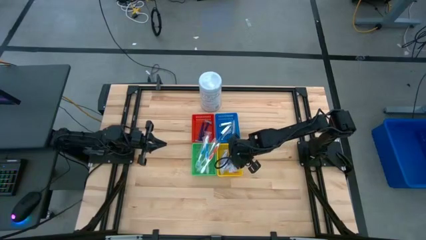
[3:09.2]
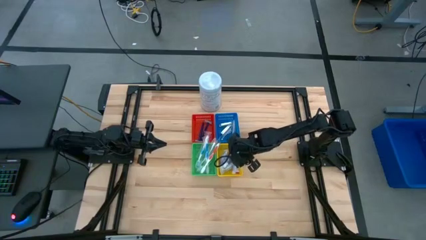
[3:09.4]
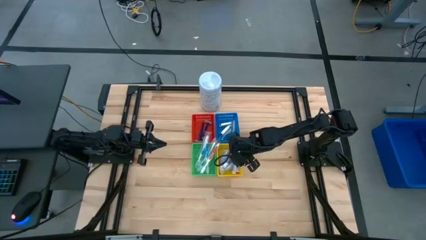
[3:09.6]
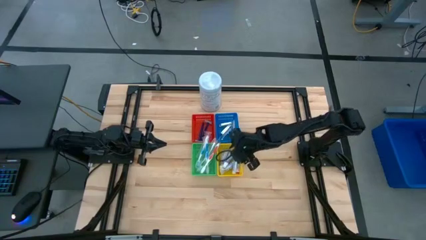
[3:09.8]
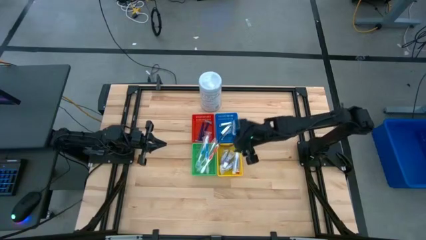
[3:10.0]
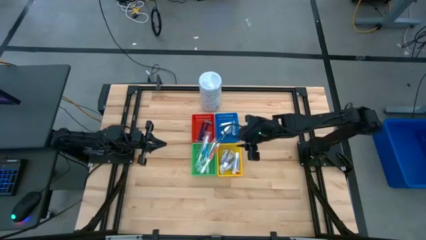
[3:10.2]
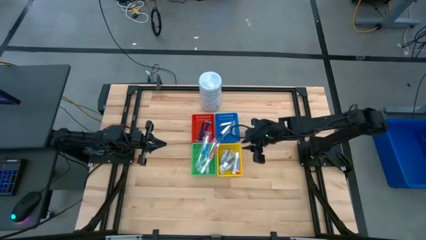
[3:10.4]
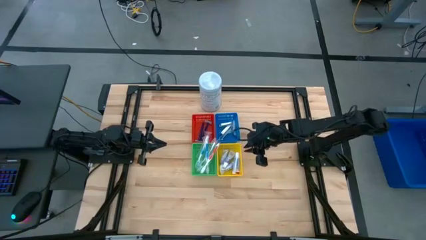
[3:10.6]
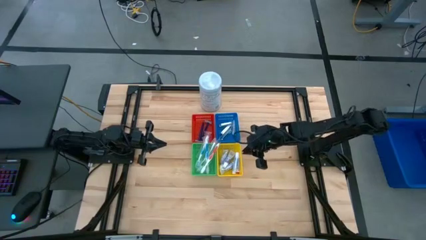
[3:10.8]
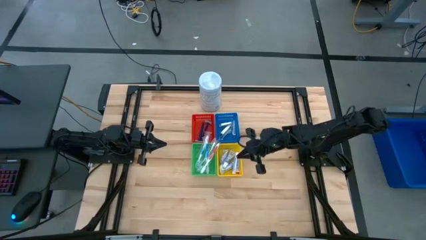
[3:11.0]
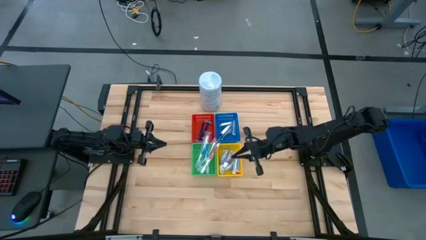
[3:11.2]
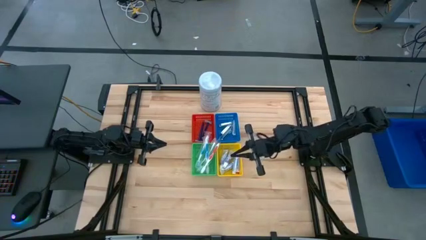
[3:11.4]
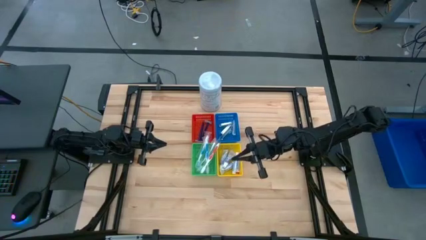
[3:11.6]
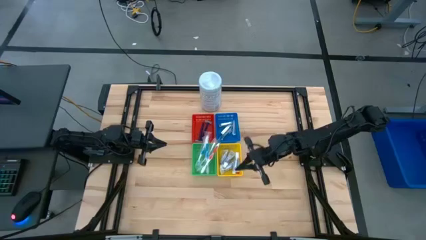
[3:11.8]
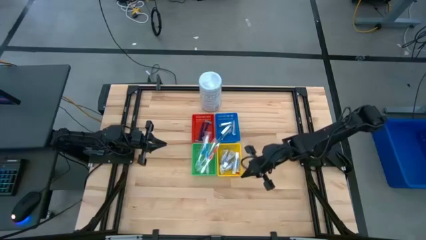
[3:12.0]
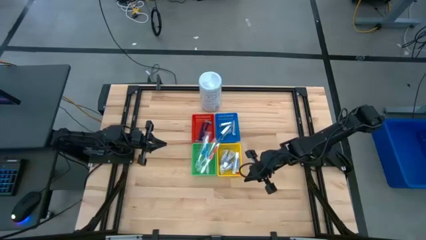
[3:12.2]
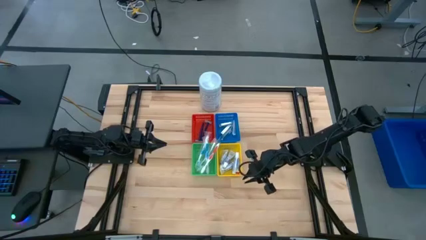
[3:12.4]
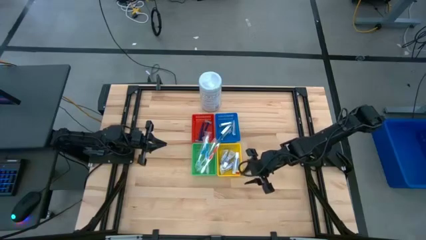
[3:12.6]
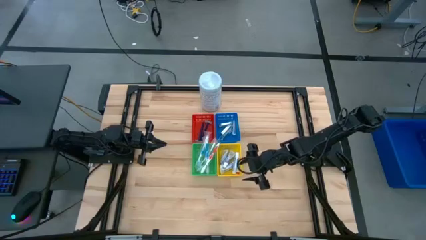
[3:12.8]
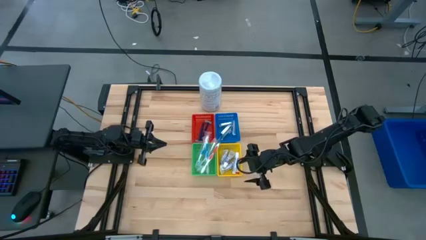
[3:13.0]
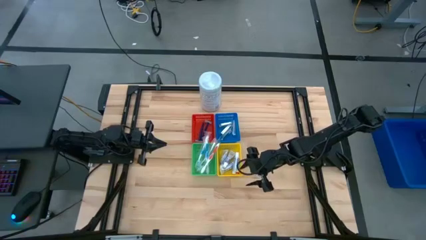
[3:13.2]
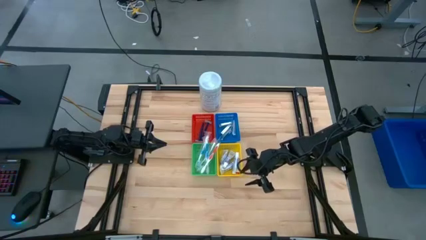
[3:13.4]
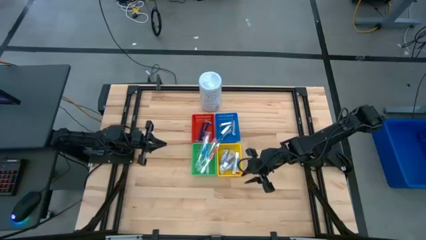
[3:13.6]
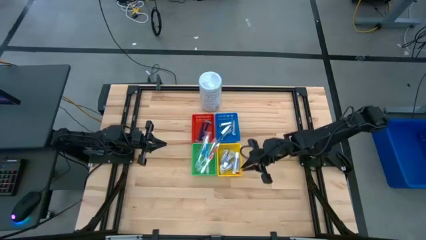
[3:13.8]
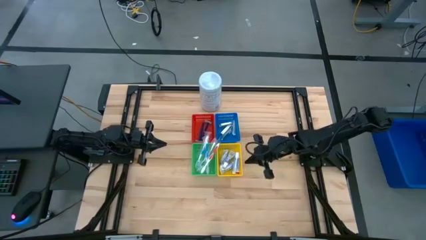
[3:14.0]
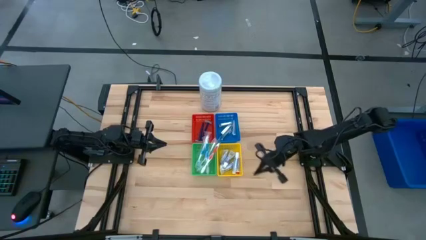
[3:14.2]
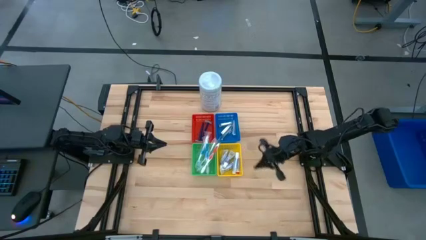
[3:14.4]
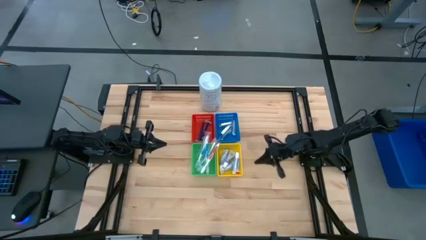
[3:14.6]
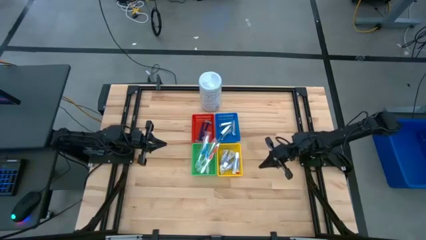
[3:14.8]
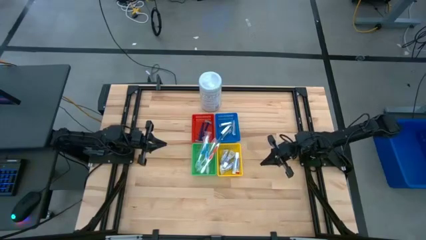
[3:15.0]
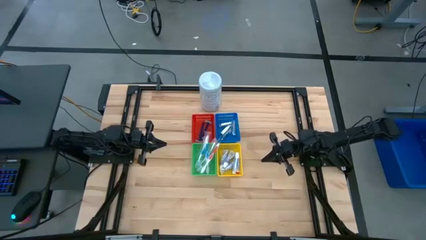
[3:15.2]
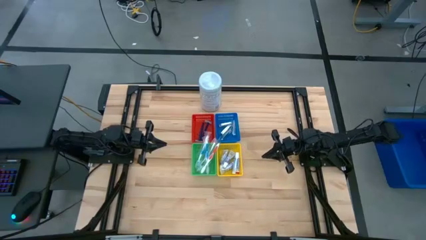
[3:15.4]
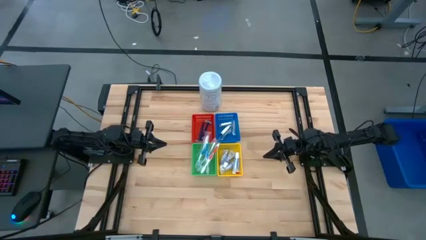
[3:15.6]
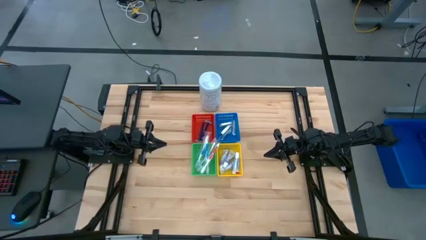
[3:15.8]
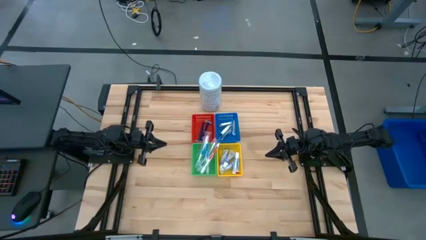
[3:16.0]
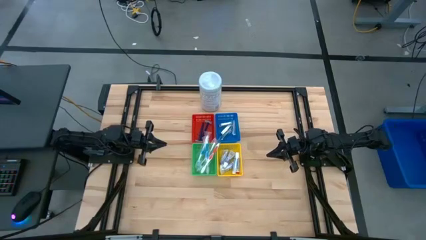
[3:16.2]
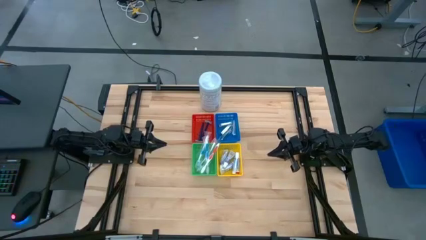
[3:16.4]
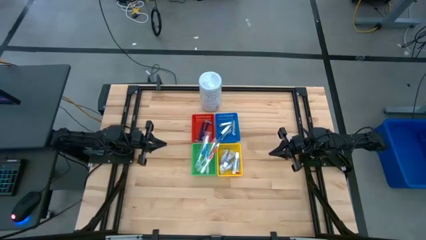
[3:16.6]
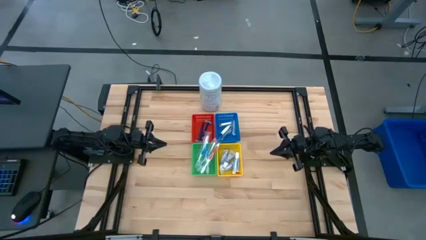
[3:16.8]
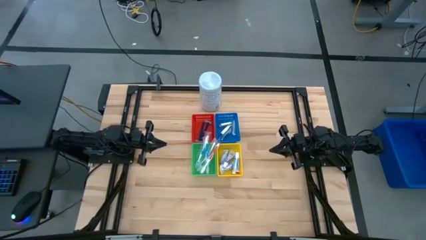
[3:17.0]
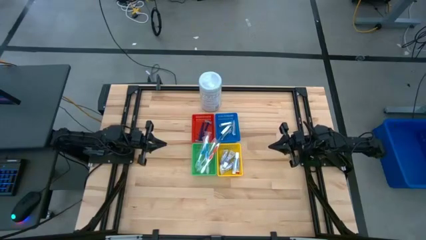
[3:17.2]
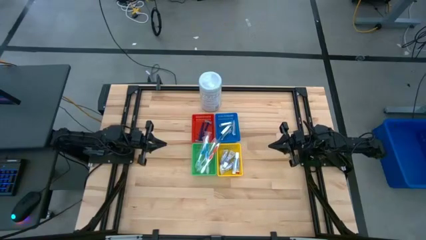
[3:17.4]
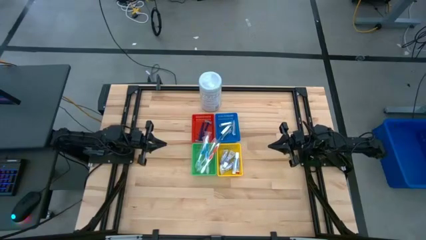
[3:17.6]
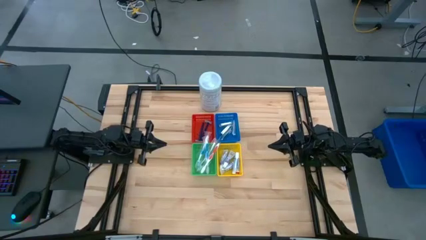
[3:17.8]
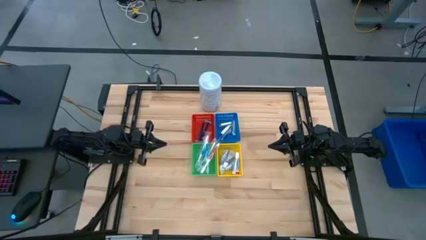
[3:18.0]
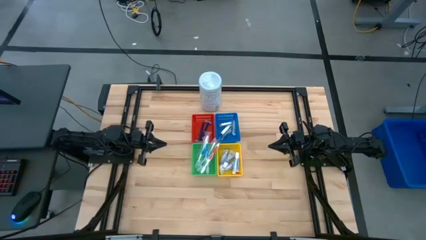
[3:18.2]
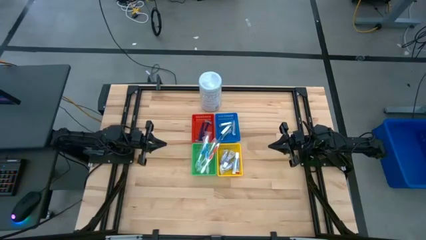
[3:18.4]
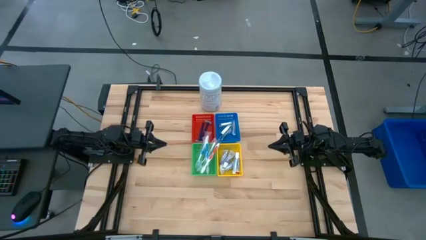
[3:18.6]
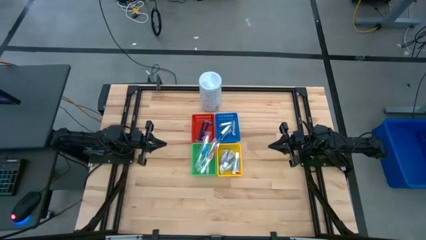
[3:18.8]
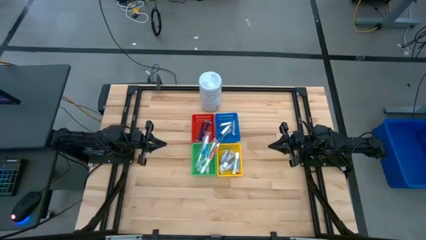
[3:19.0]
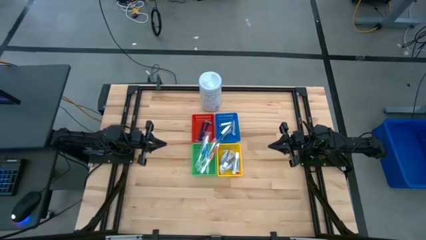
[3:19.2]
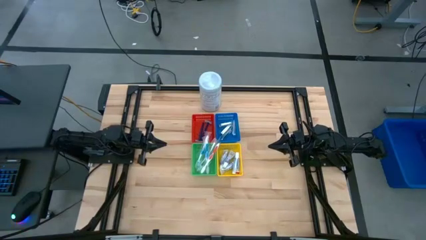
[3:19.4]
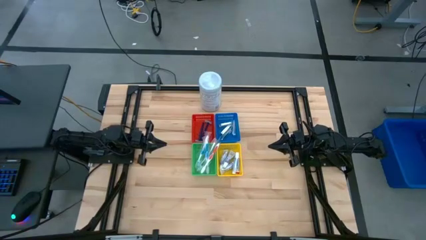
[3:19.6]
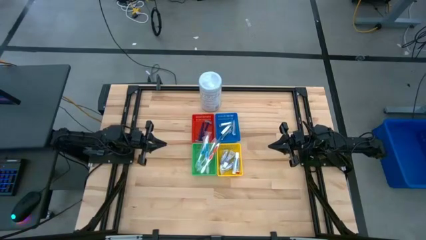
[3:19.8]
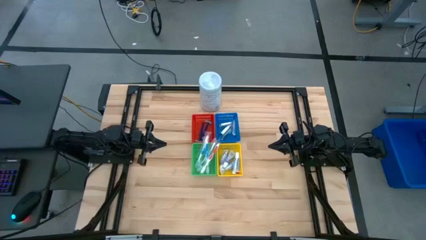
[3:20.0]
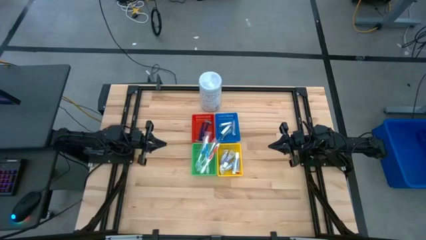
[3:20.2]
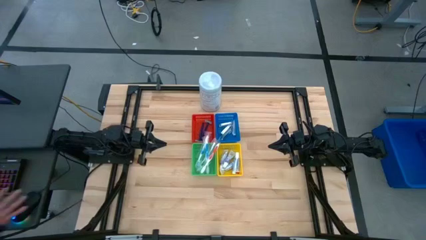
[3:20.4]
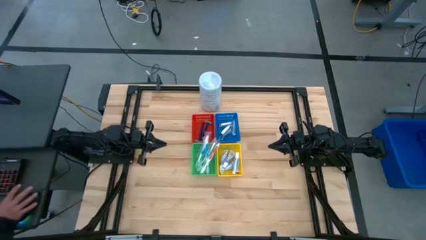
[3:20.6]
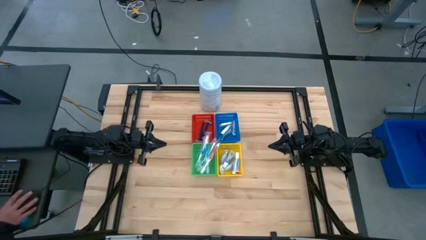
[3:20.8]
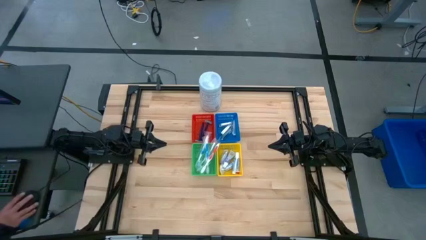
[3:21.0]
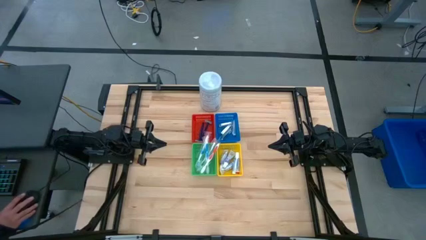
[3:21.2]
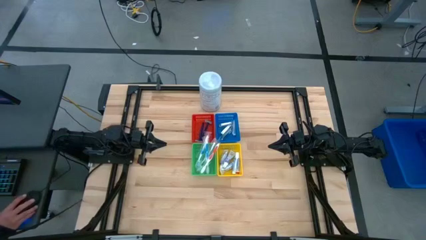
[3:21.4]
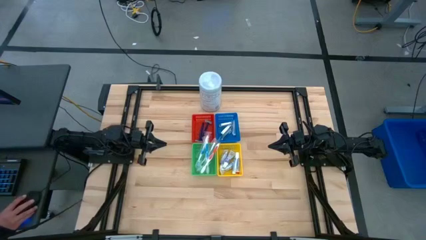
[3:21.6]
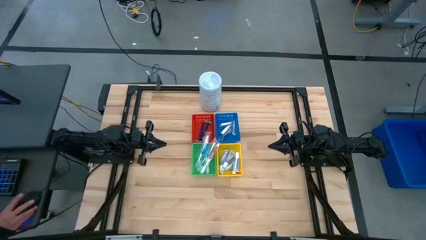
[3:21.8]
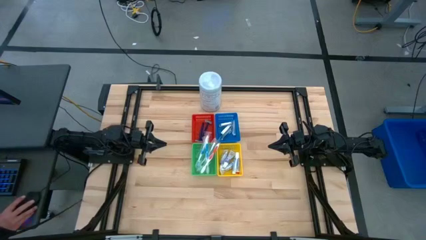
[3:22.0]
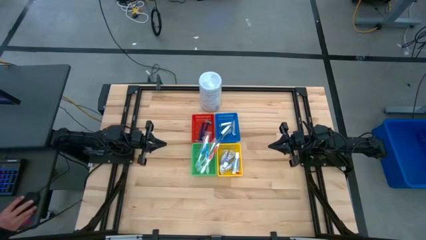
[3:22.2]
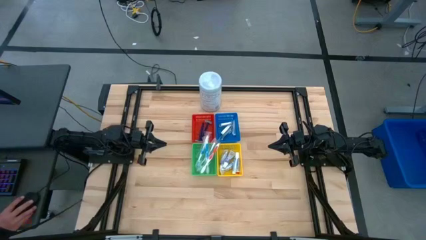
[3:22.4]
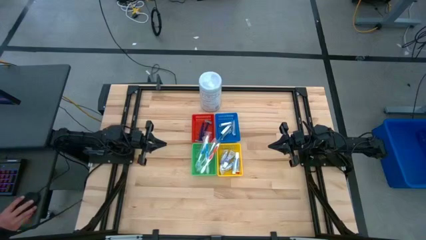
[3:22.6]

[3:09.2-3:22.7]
Task: Pick & Place Travel size toiletries
Return to Home Position

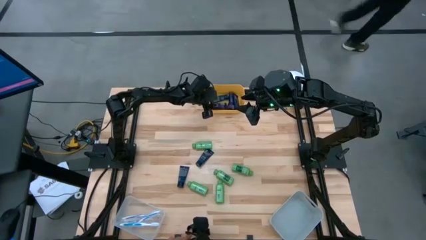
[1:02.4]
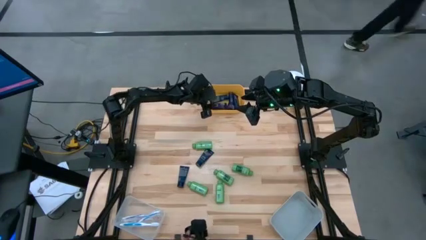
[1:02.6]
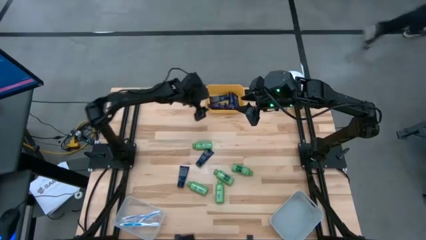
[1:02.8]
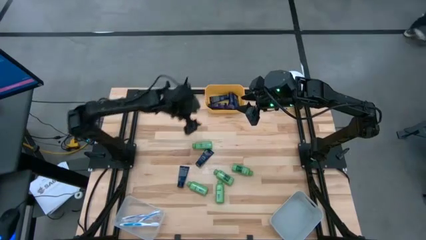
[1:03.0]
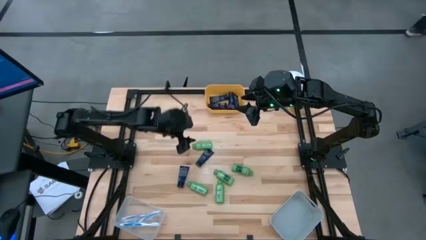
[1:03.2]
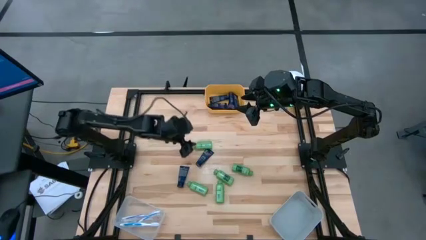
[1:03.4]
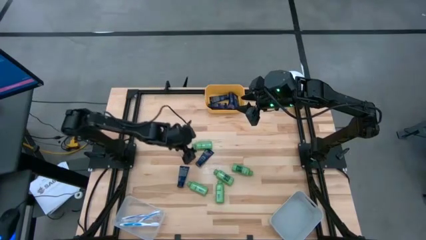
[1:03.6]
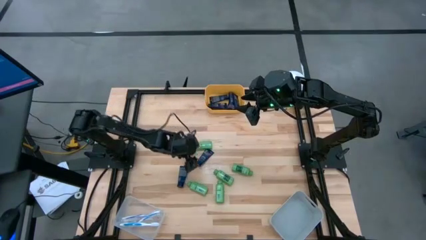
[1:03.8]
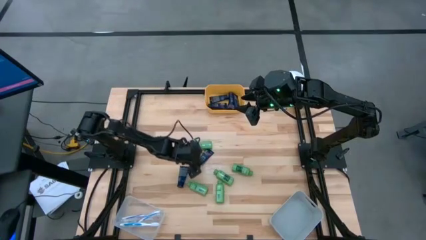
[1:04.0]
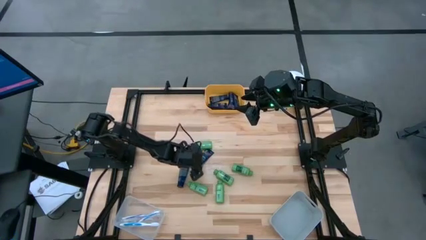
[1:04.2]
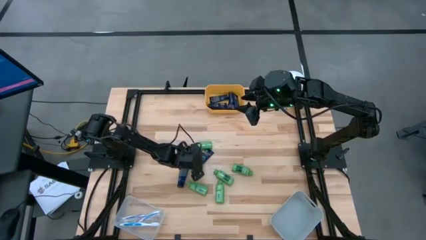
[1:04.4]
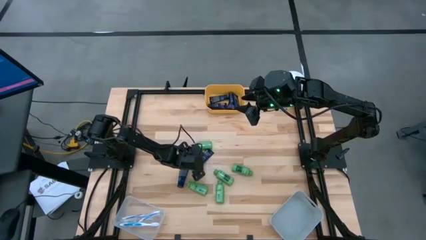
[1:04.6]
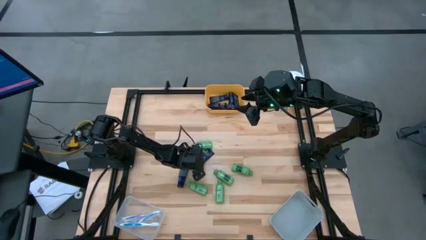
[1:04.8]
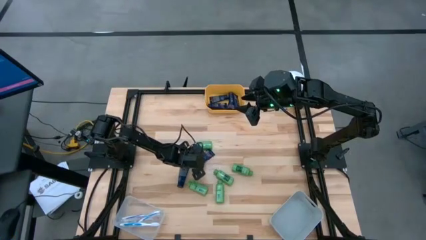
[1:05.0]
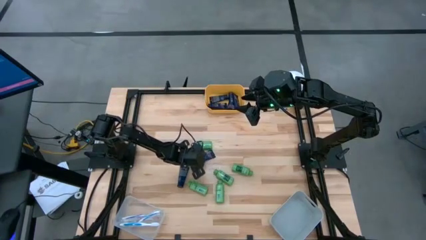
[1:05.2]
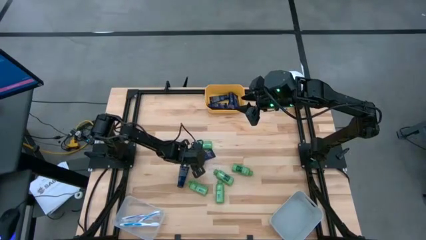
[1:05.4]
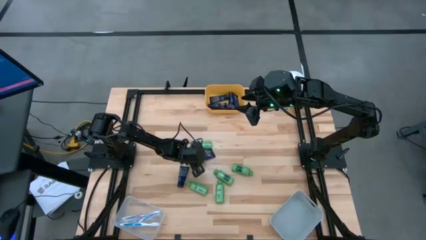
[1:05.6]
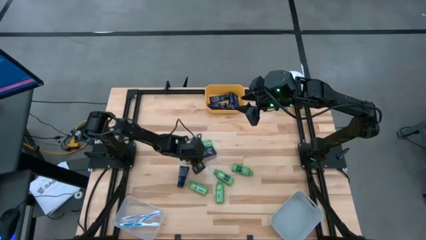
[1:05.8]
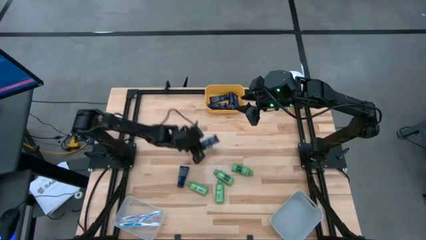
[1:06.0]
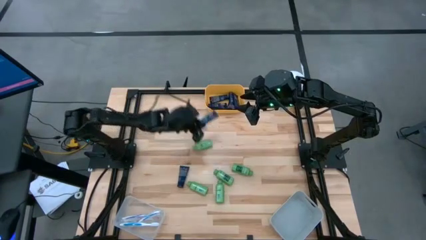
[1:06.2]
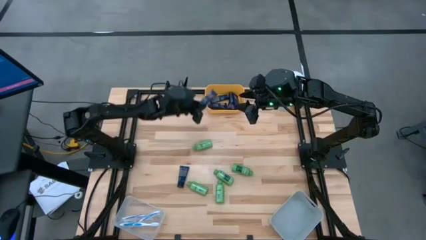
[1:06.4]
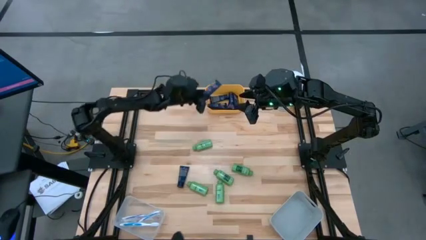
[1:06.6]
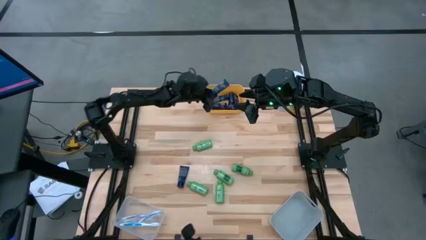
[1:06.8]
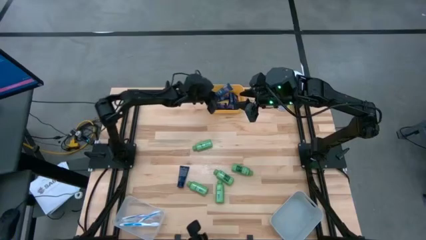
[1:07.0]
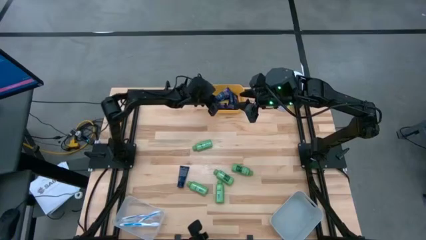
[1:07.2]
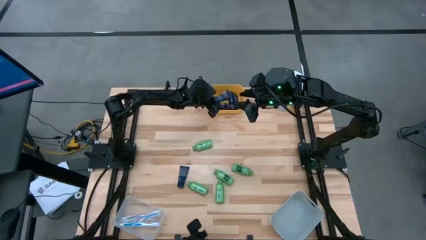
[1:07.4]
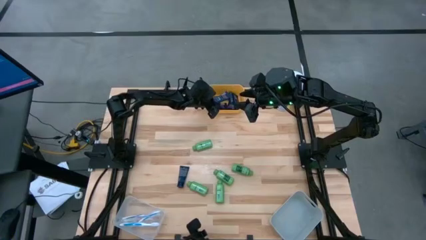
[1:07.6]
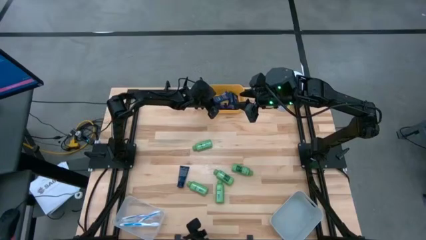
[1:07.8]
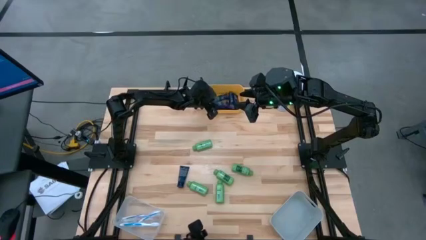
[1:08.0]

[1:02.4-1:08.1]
Task: Pick & Place Travel size toiletries
Put the shave cream into the yellow bin
